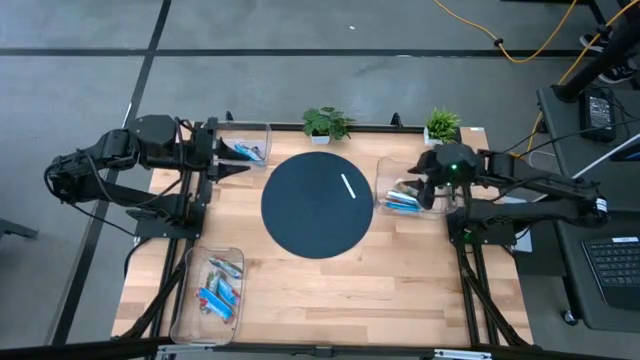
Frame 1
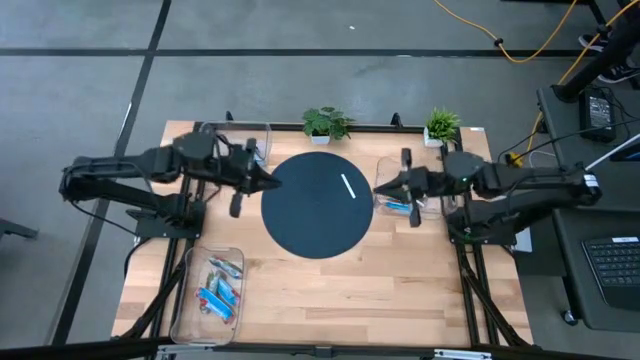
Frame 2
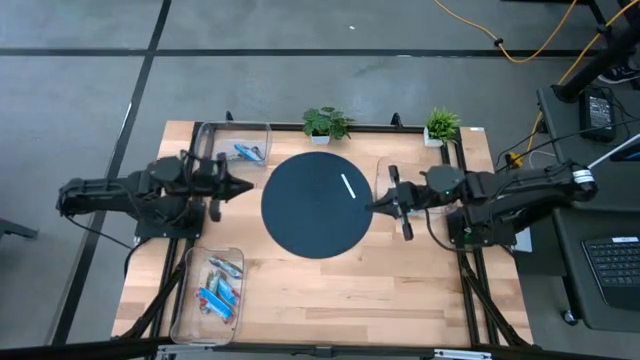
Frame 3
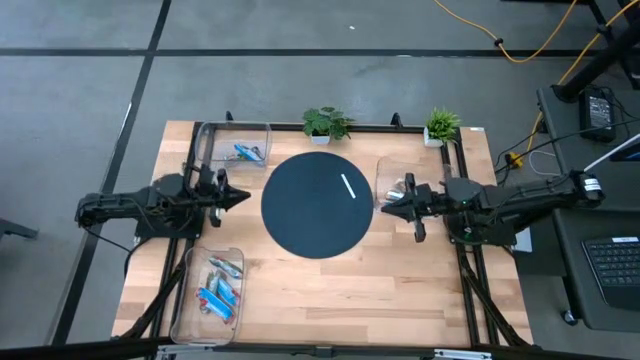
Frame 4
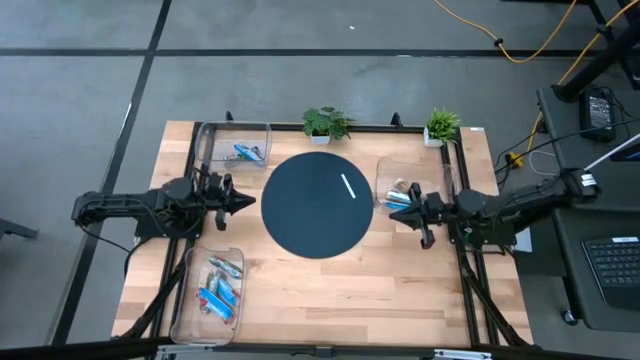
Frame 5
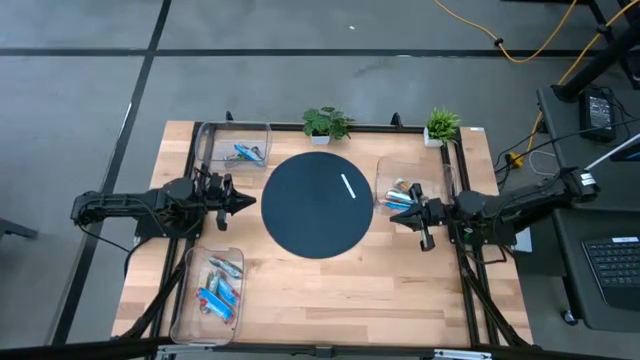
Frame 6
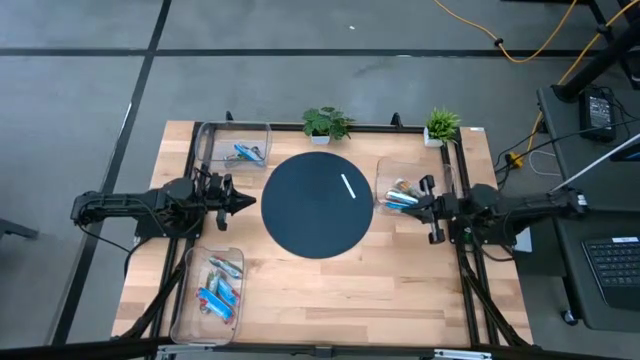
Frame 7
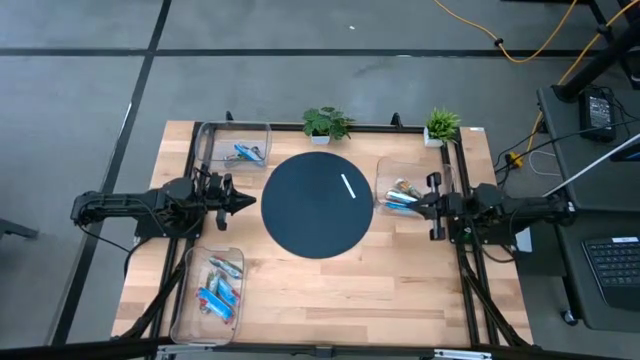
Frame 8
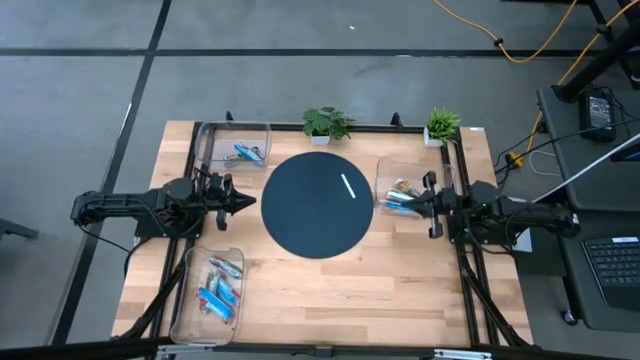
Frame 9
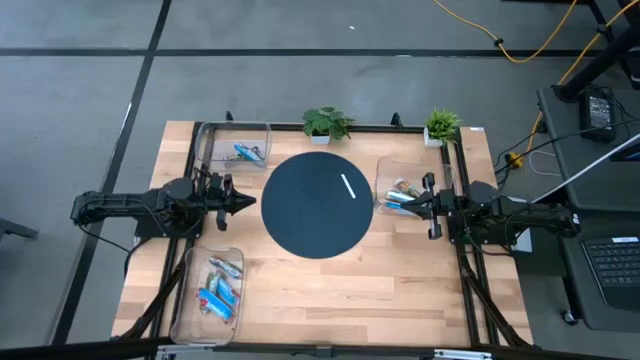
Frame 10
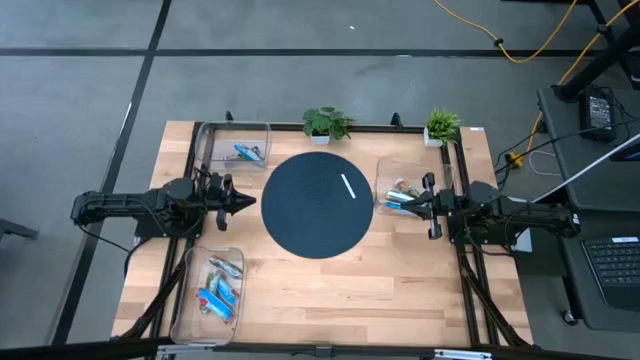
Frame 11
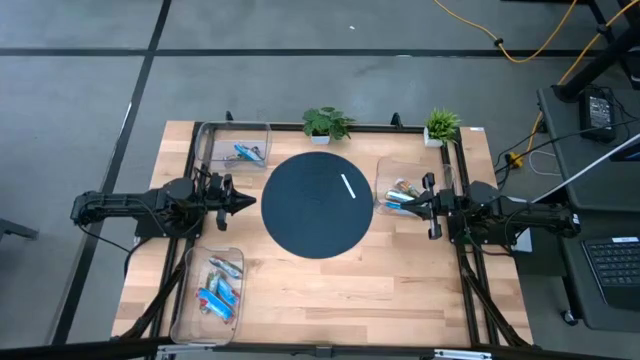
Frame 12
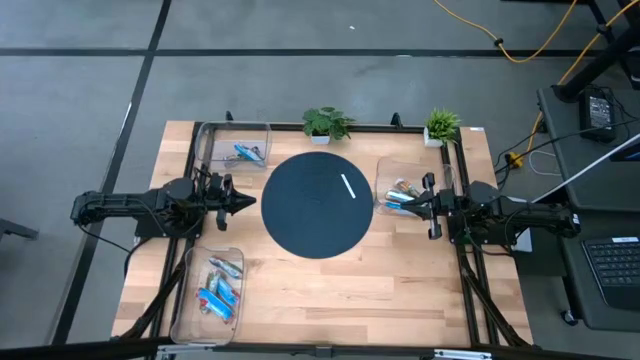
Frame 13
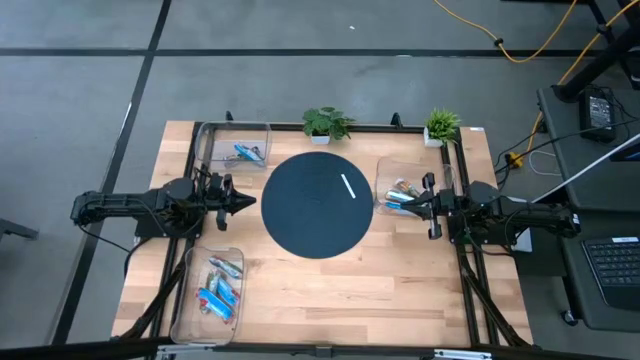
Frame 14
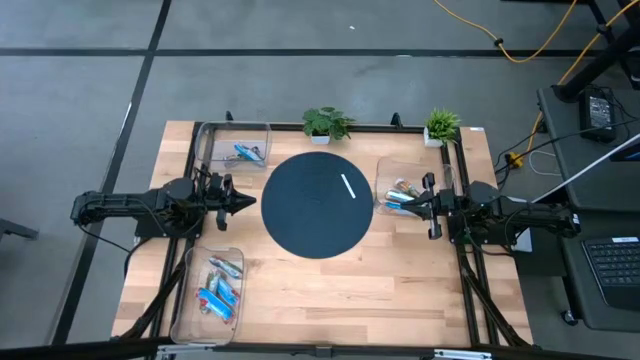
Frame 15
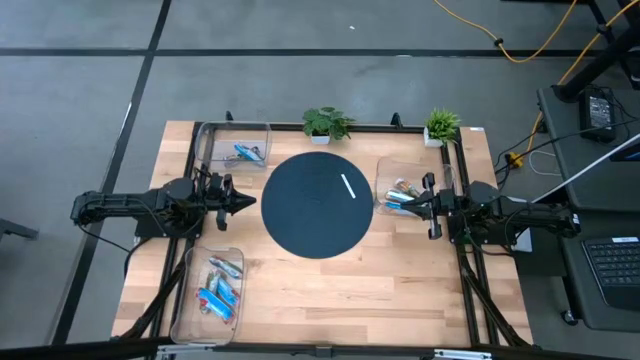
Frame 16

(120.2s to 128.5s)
Task: Pick and place Granola Bars by type
Return to Home Position

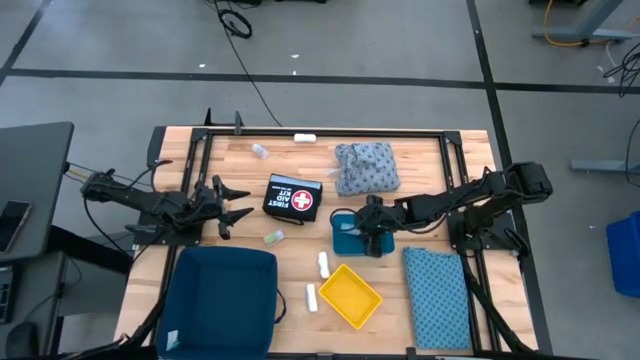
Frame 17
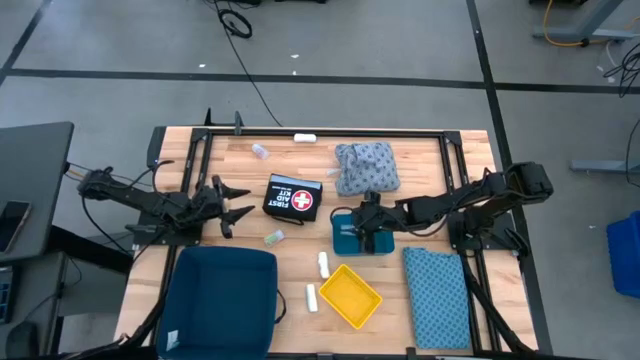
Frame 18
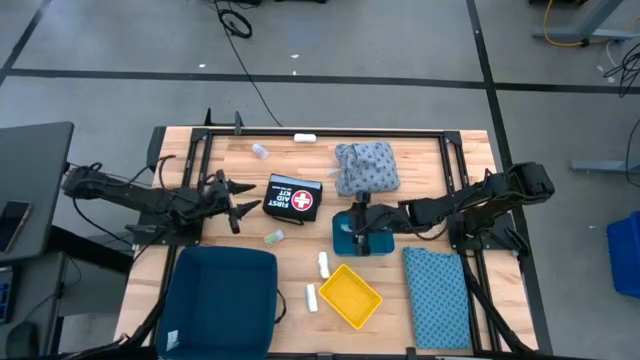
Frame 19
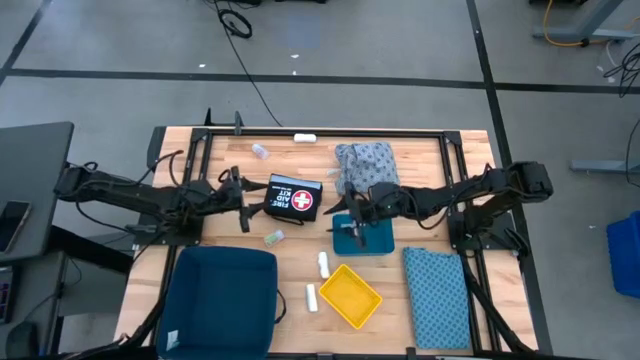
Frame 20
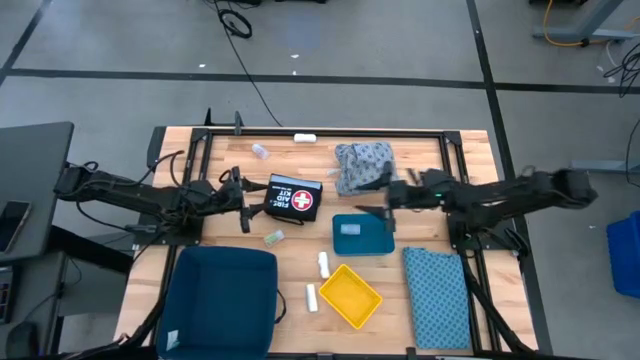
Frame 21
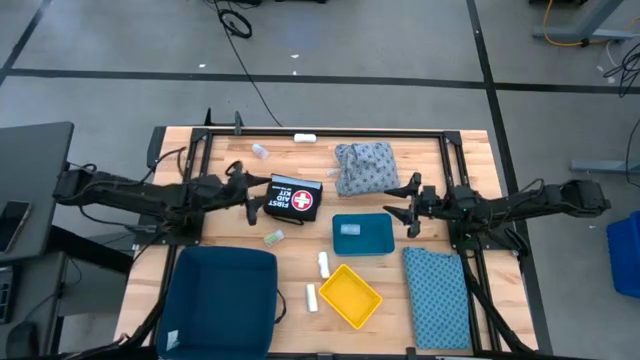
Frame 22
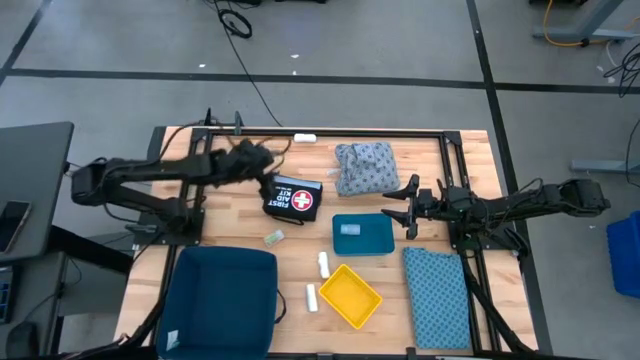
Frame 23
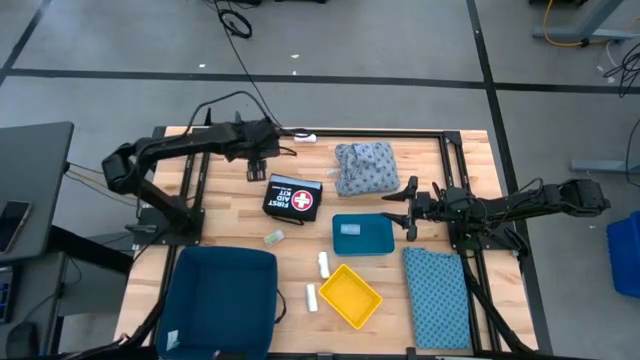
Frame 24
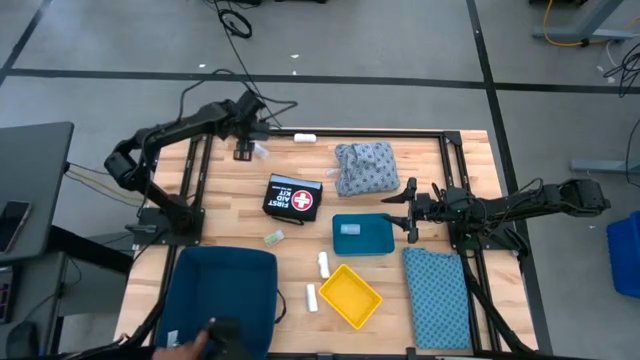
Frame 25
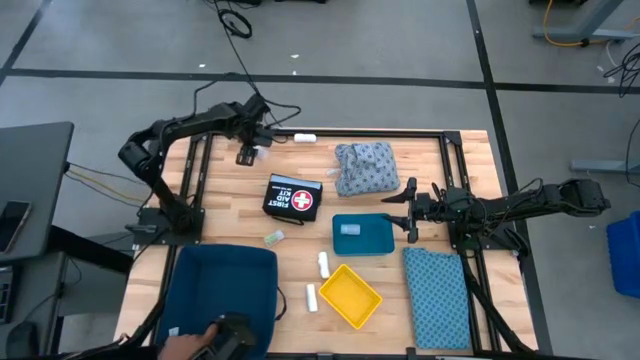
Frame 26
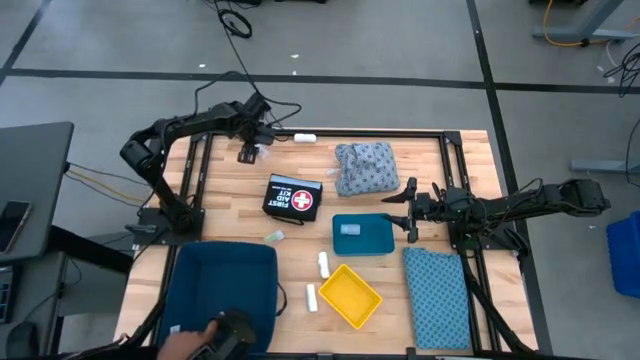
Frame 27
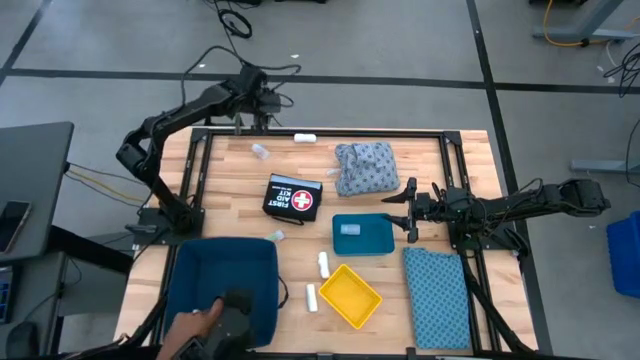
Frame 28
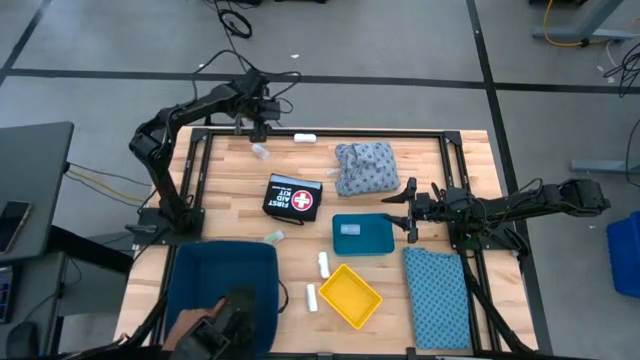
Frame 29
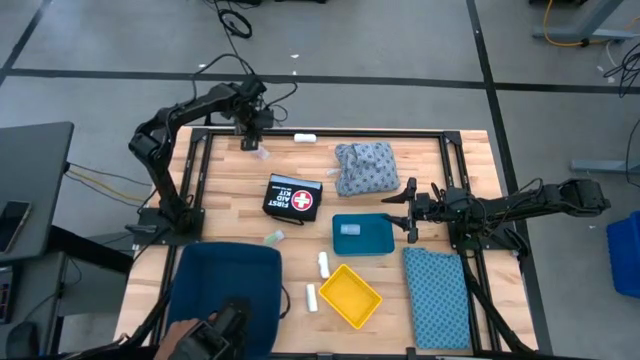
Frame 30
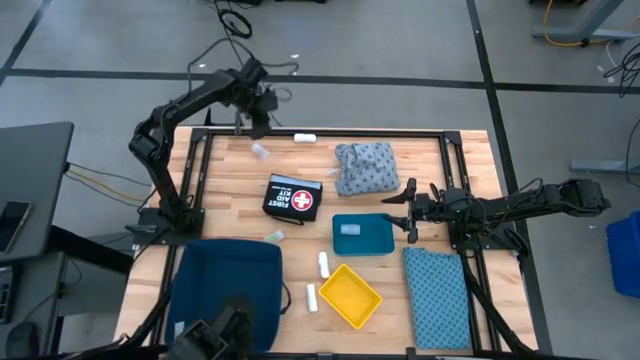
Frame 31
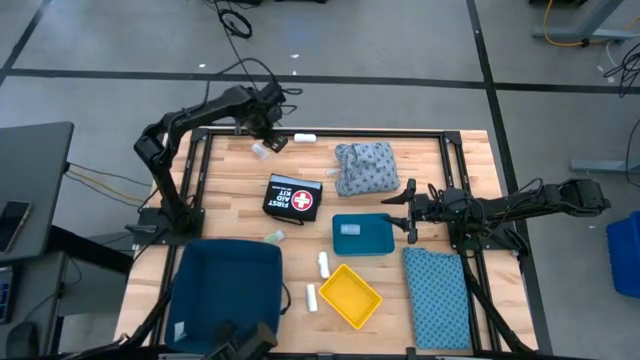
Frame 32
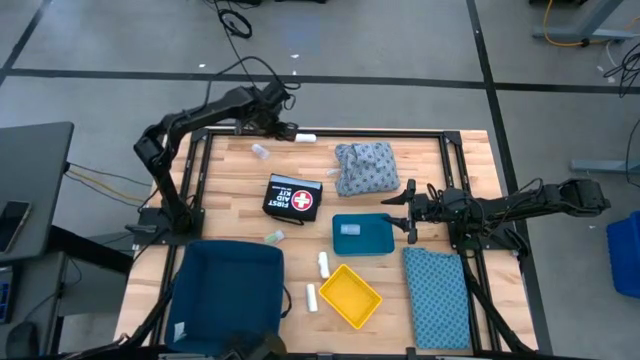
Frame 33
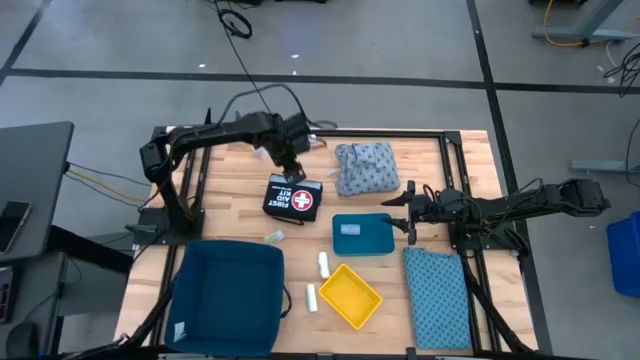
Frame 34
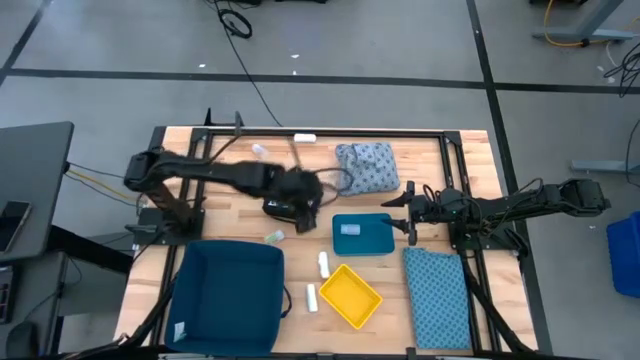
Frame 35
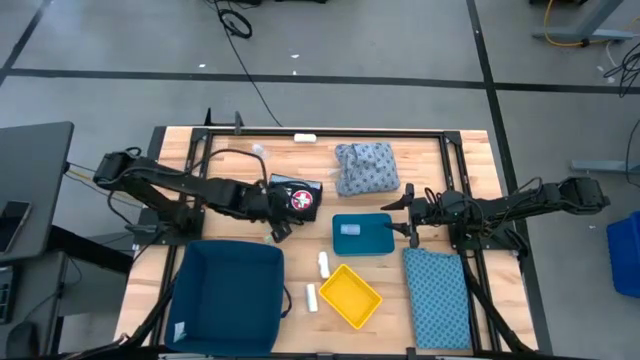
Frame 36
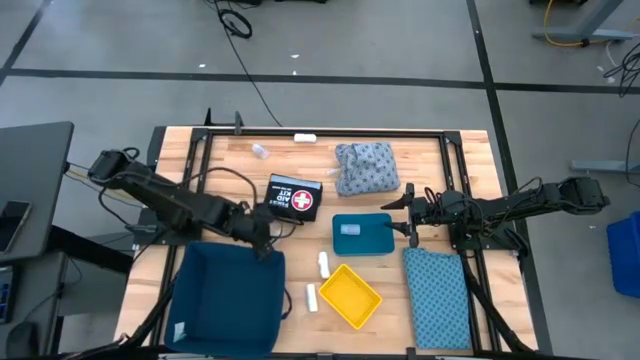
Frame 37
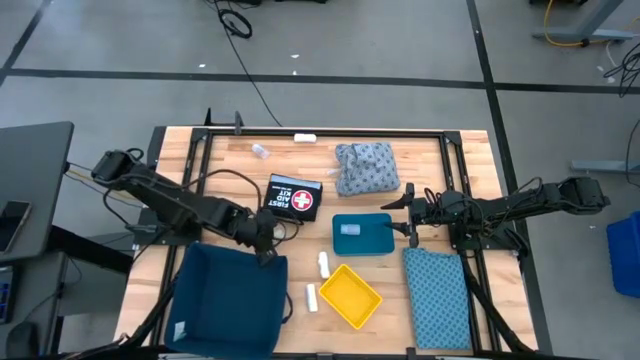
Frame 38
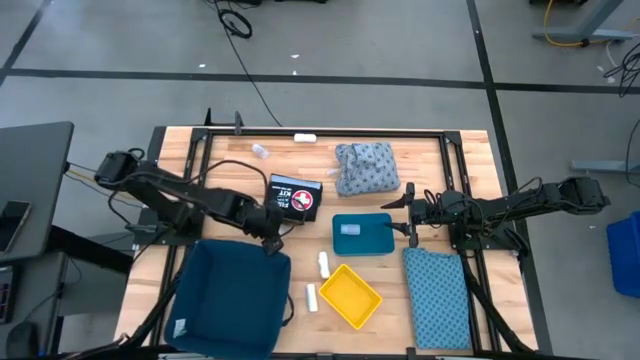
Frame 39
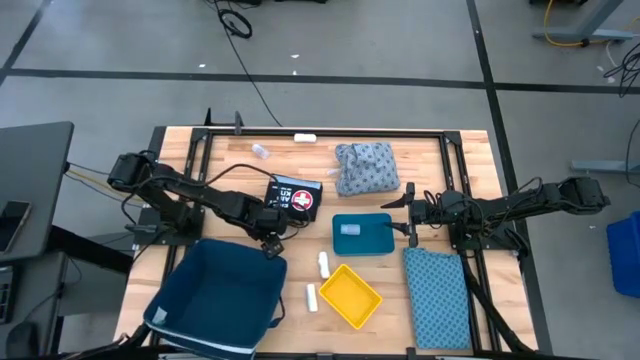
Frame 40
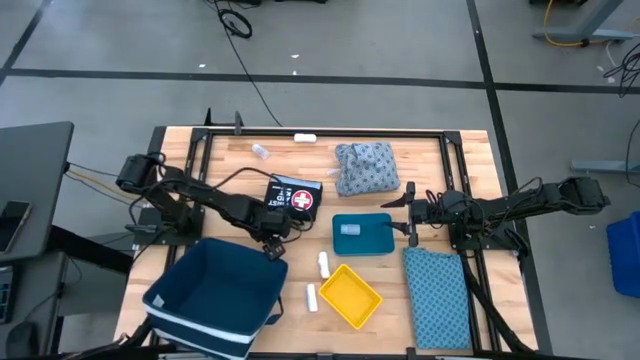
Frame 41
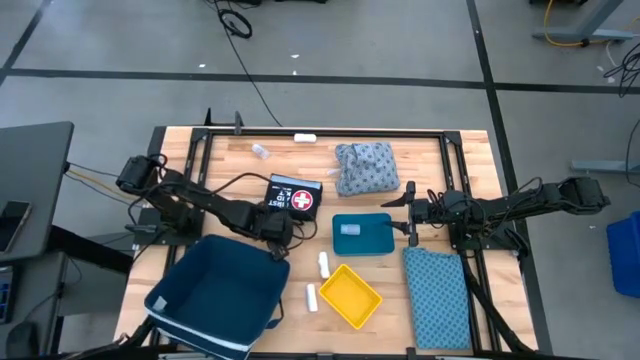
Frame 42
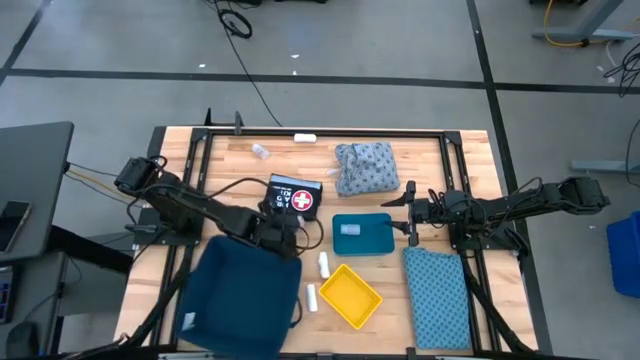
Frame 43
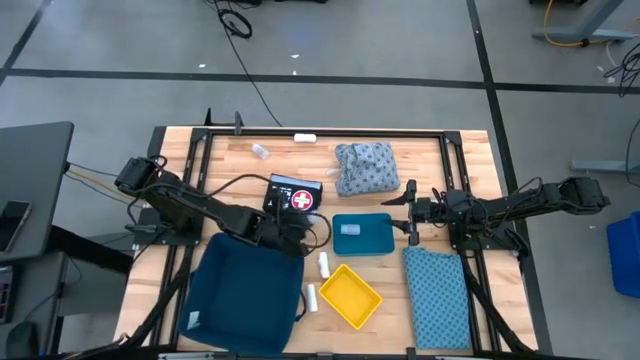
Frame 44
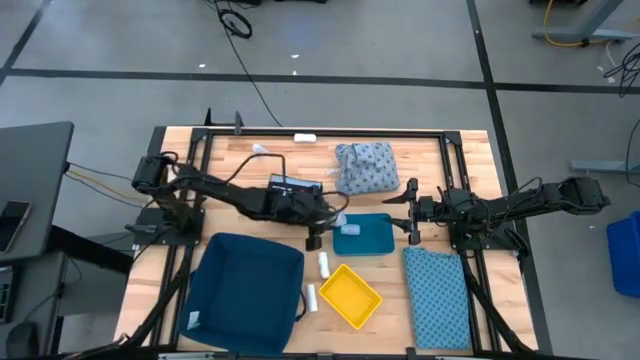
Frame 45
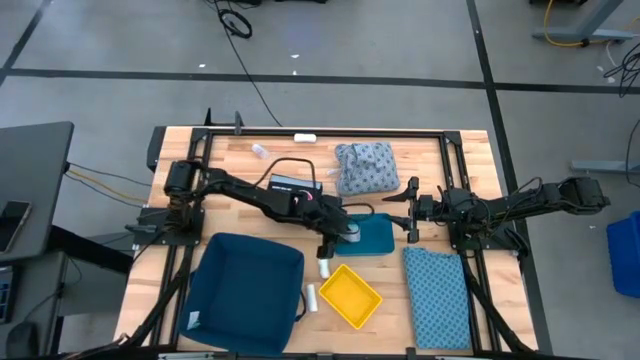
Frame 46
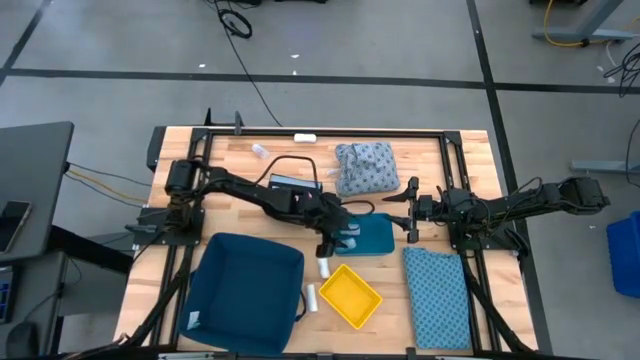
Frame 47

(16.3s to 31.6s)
Task: Pick & place medical supplies in basket/bin
Put the bottom pill bottle into the blue bin
